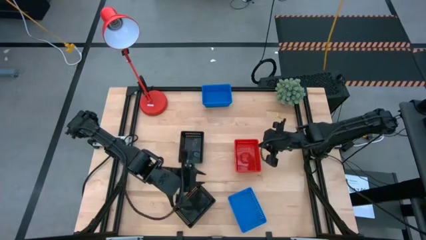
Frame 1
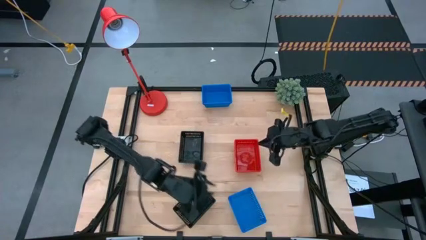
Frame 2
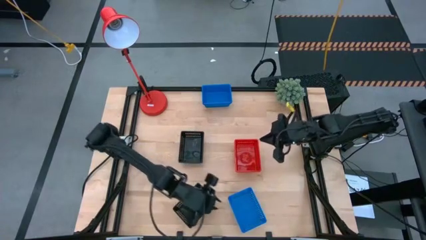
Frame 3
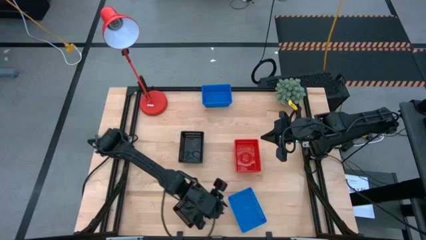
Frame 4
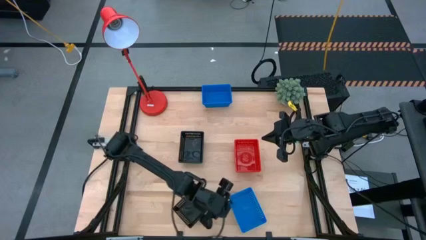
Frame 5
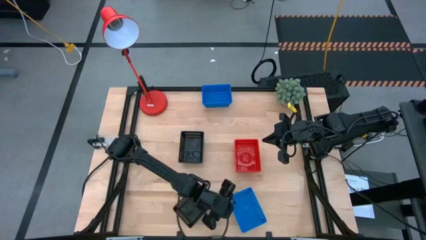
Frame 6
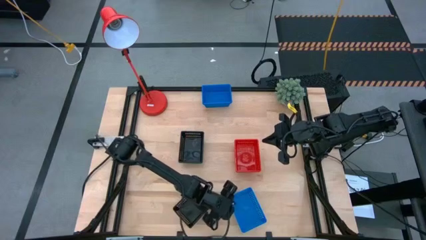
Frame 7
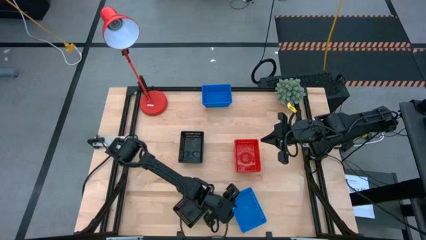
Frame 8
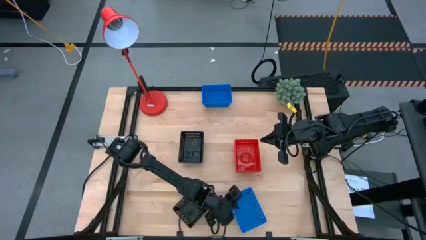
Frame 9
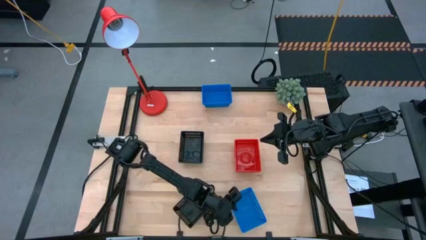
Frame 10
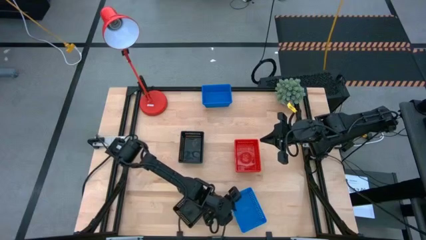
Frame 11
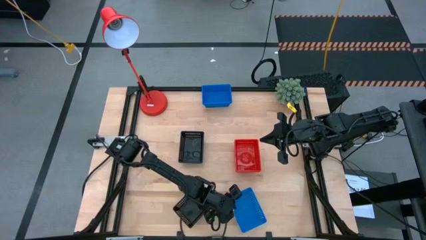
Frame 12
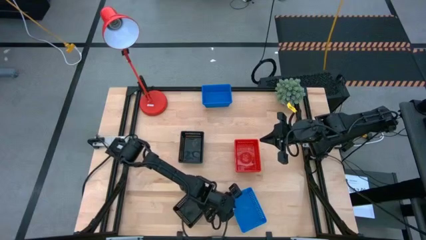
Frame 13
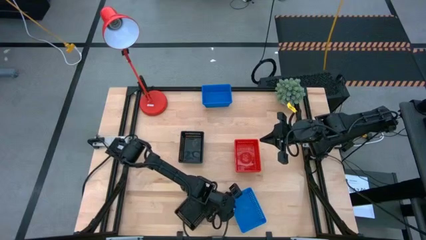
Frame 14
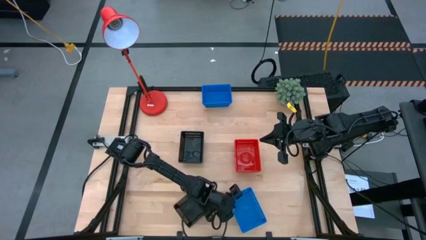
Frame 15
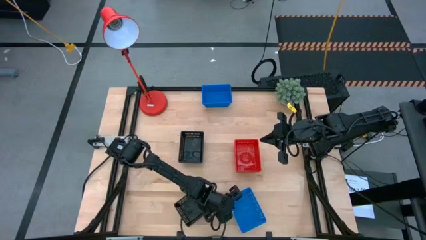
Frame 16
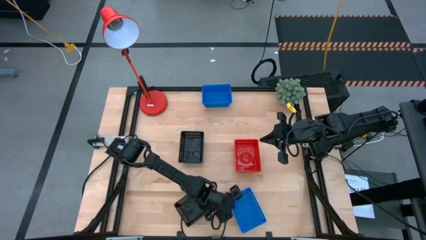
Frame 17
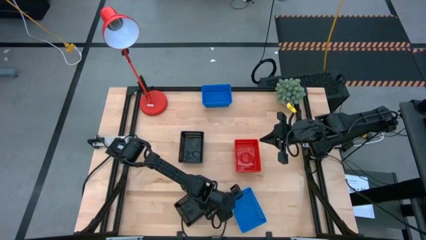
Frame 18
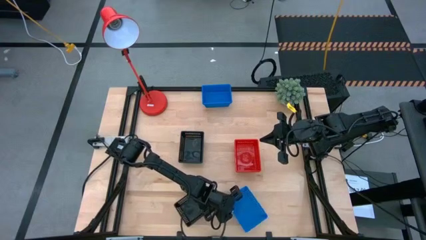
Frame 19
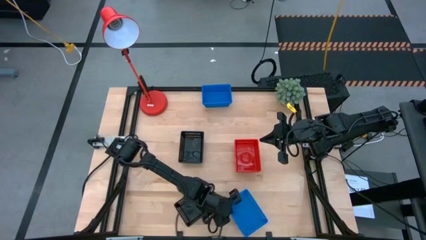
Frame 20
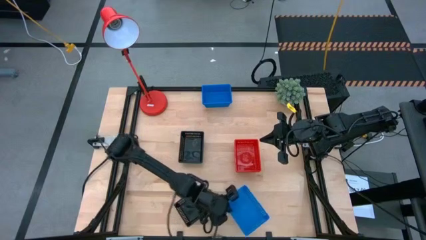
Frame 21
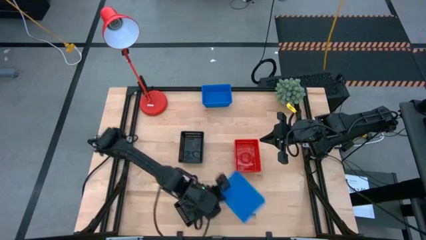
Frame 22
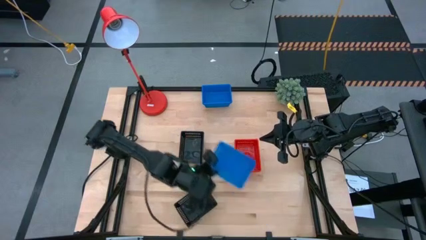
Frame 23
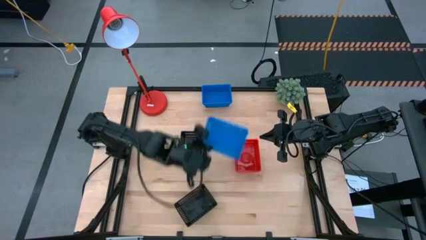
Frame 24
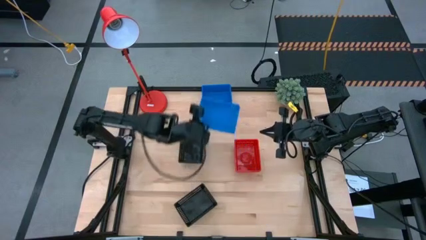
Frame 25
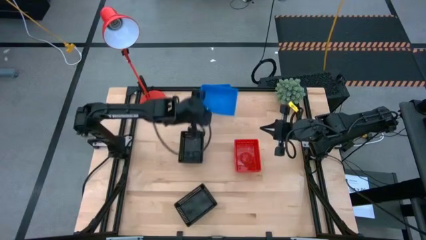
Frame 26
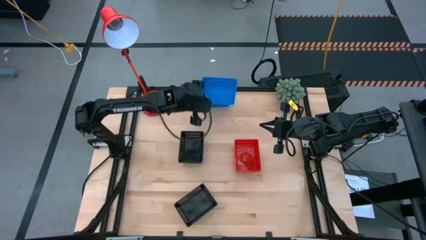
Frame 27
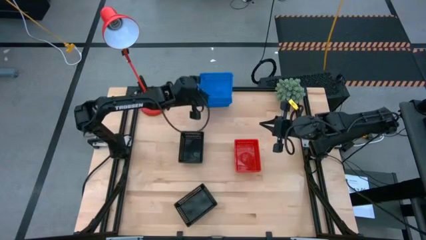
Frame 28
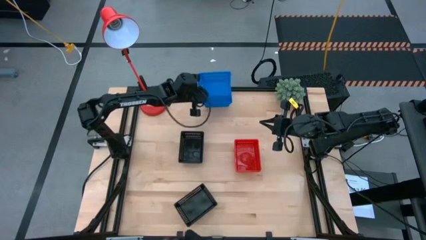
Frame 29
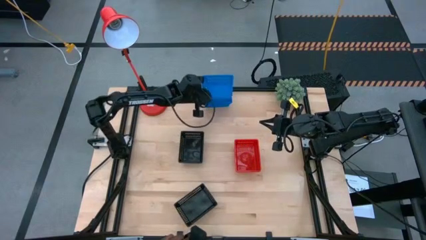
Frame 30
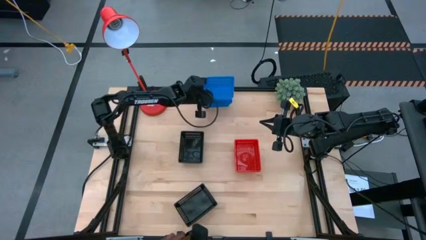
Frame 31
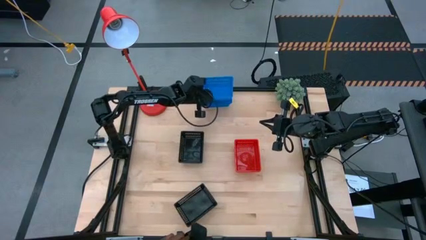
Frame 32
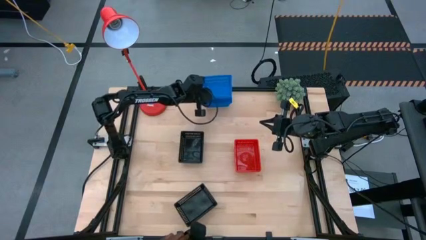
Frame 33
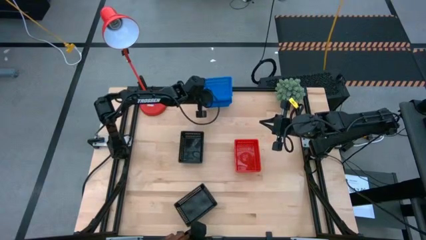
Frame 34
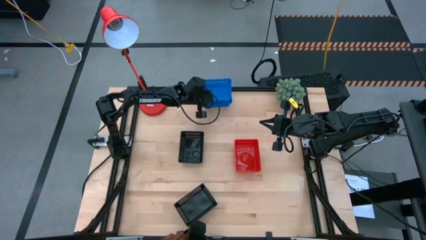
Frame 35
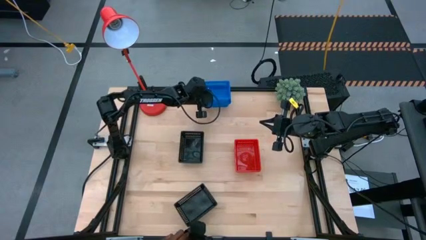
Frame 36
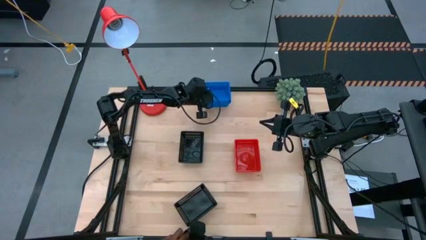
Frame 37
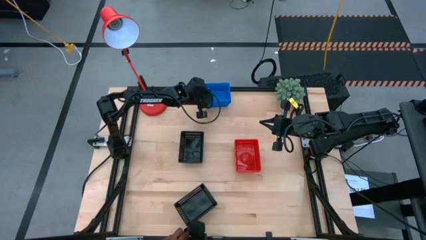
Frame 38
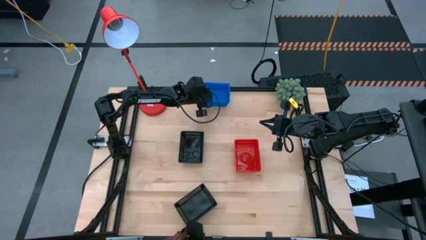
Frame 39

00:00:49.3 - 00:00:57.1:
Stack the bottom blue bin on top of the top blue bins

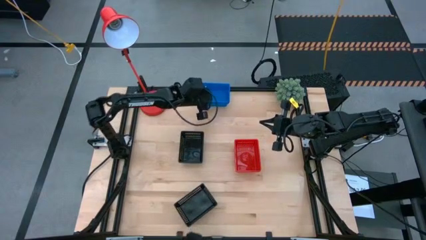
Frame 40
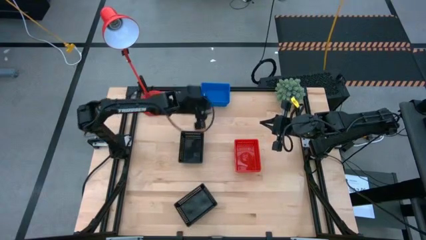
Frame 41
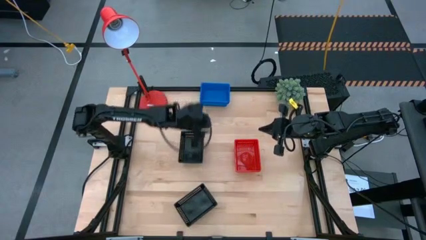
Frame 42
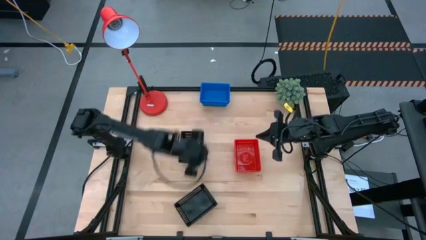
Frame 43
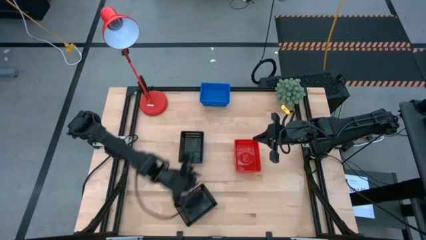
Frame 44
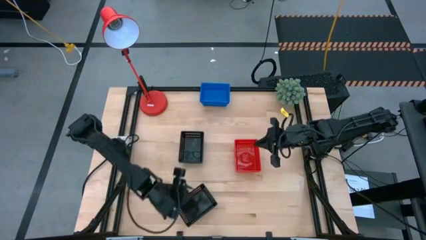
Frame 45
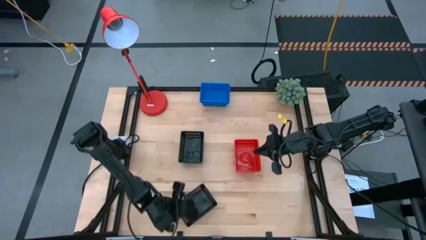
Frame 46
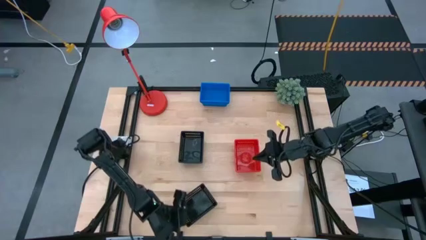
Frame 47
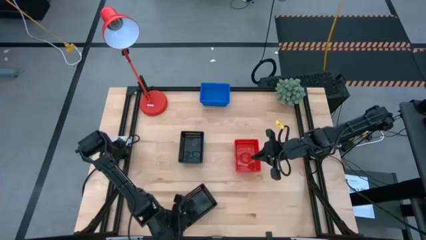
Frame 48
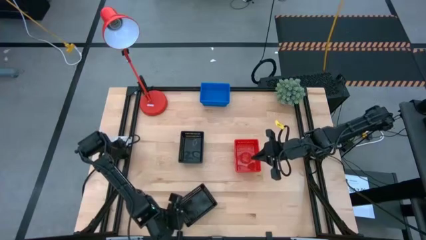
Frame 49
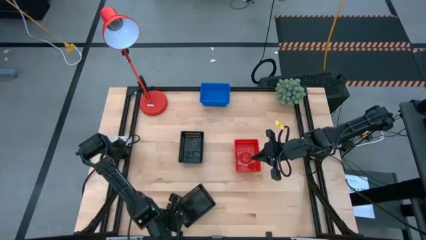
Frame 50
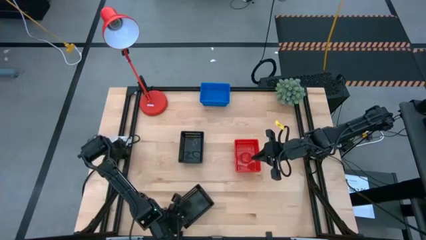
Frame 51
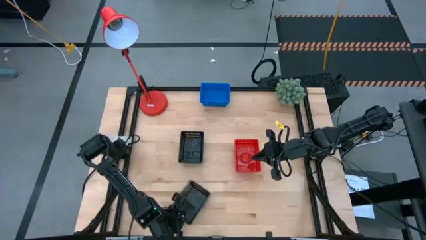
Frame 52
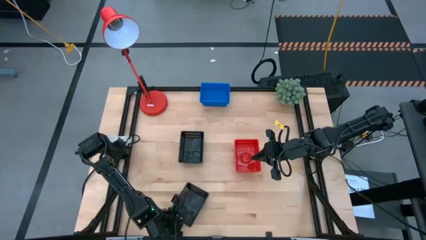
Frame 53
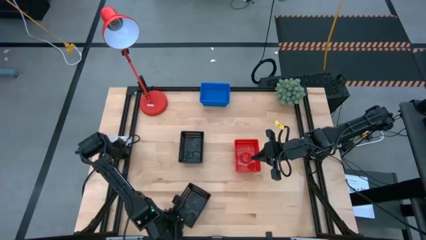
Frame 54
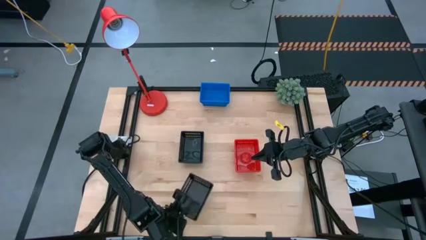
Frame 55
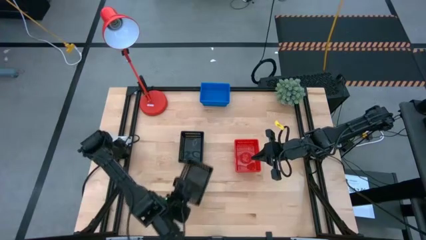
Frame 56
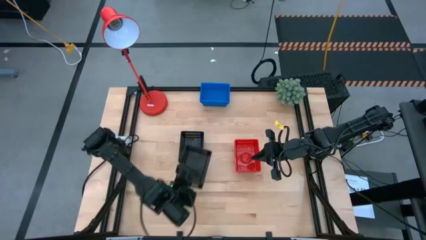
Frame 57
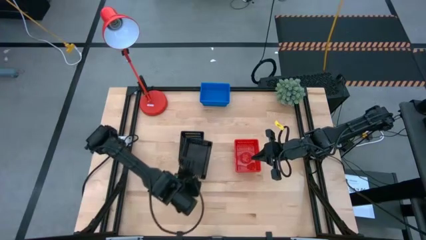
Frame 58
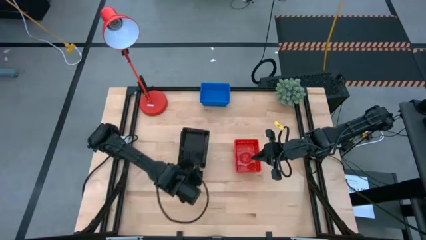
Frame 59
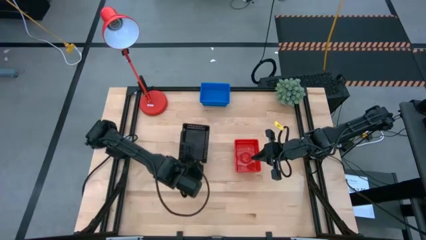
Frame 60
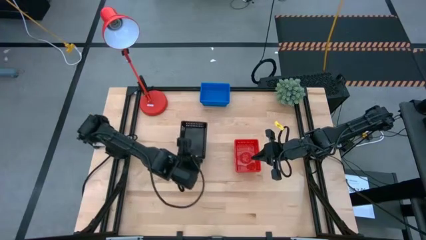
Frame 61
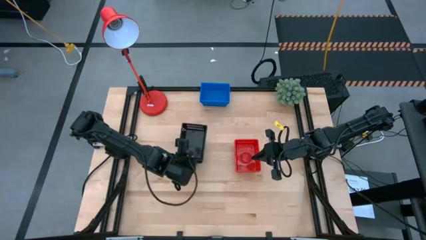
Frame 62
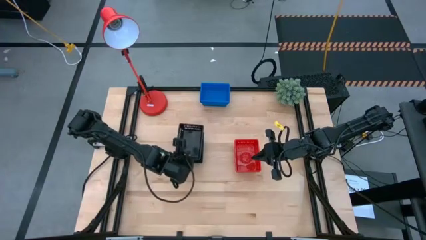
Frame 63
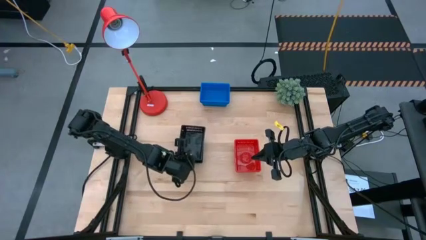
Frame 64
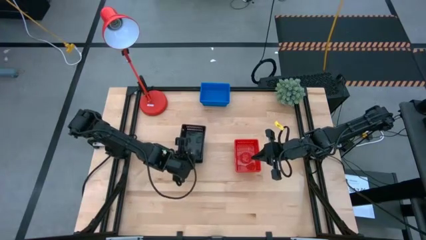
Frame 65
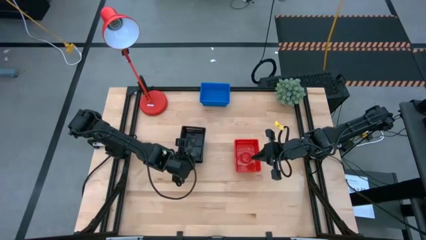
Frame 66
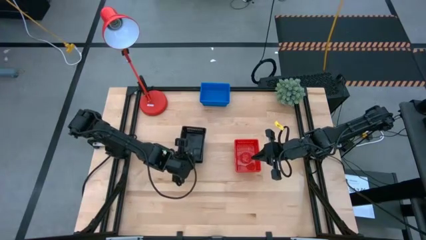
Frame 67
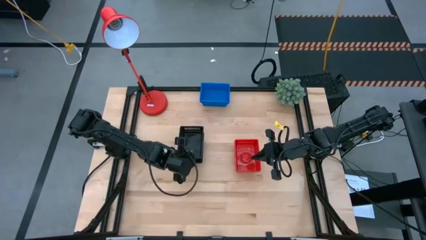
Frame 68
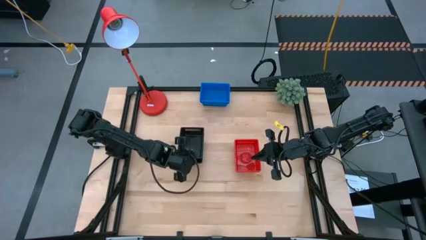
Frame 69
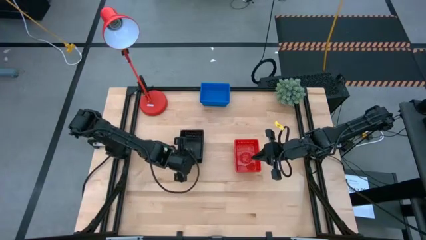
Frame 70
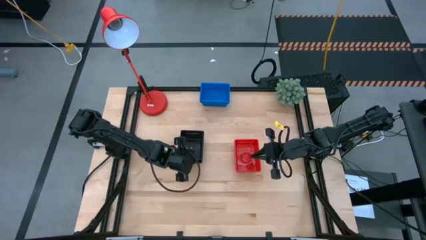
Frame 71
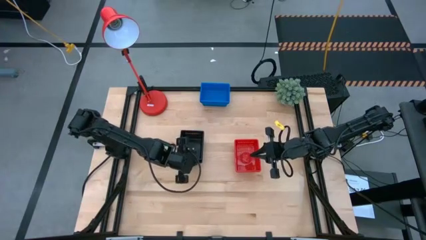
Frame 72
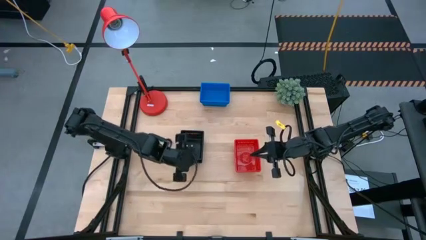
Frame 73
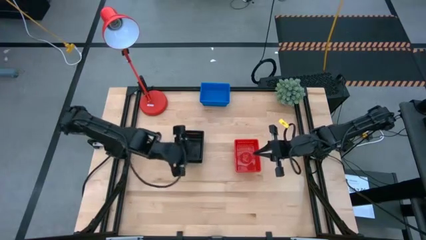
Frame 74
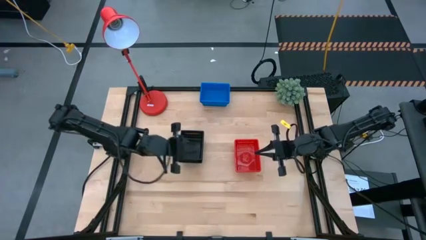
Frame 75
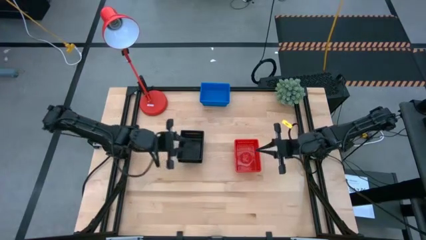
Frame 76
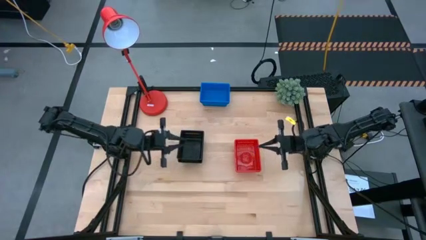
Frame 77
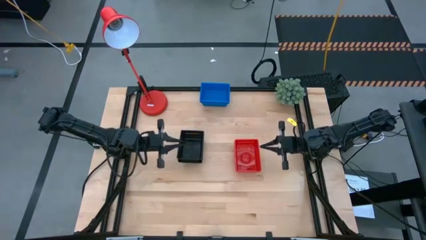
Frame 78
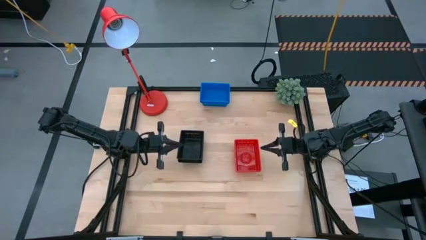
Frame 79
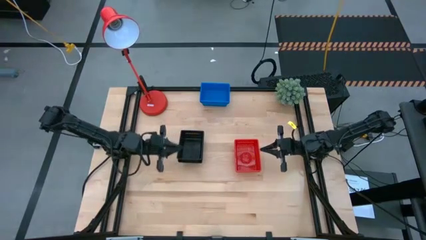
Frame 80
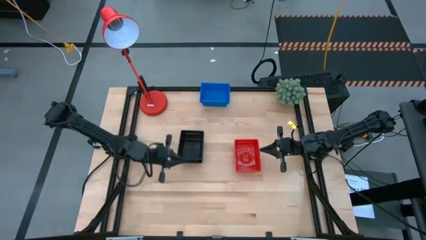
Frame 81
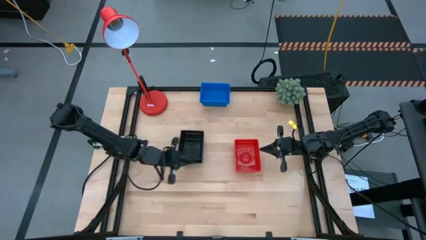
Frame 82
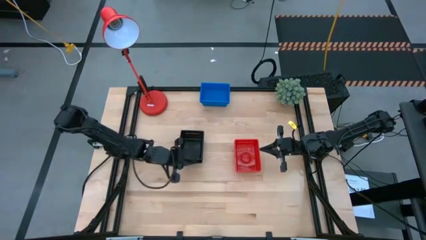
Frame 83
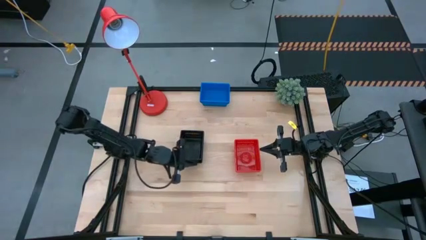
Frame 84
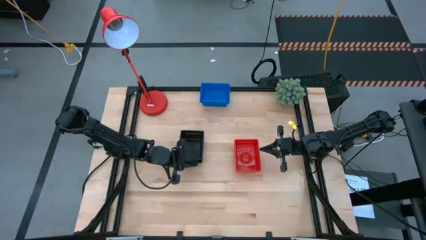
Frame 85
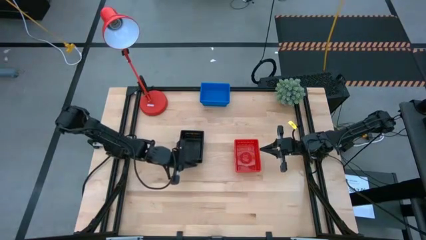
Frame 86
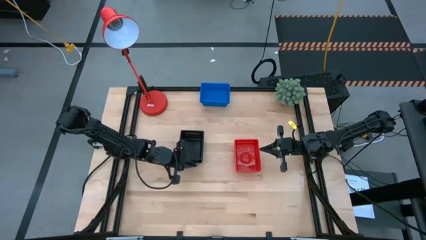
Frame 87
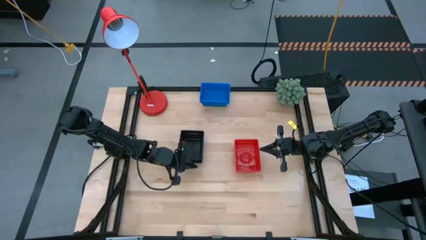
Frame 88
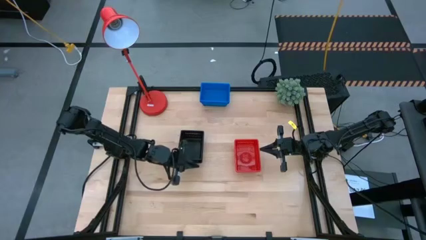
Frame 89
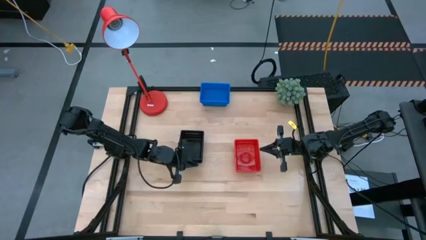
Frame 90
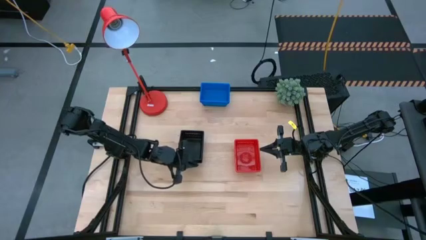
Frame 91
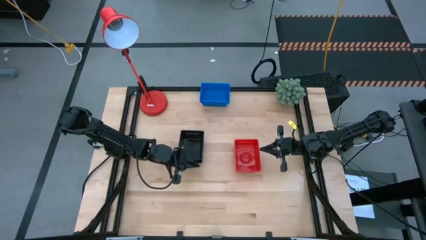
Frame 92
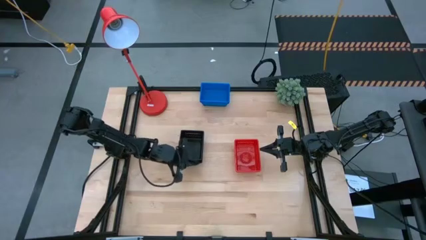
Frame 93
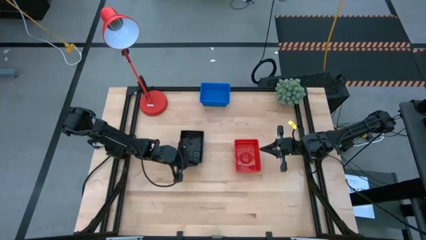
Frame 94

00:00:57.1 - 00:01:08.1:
Stack the bottom black bin on top of the top black bins
